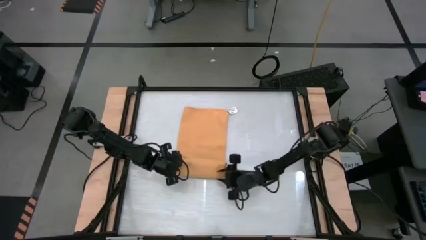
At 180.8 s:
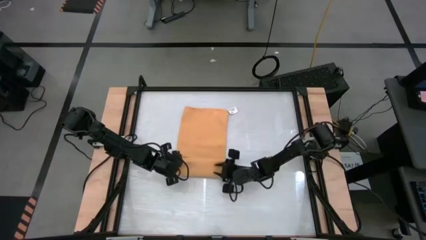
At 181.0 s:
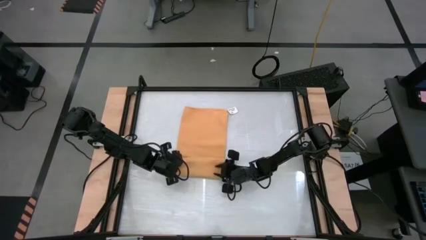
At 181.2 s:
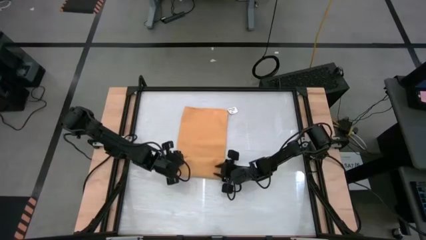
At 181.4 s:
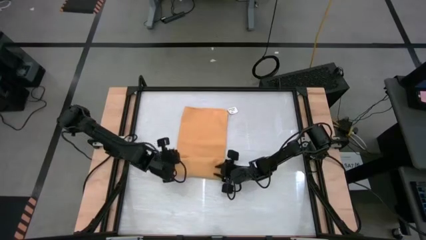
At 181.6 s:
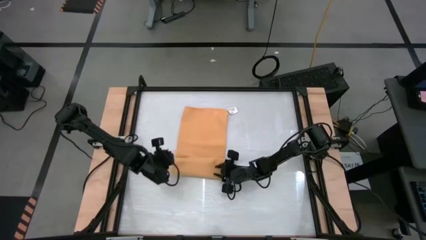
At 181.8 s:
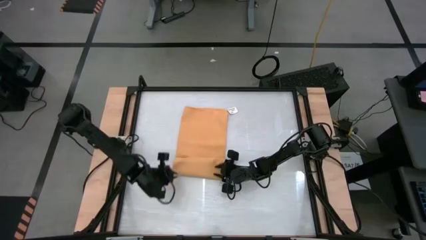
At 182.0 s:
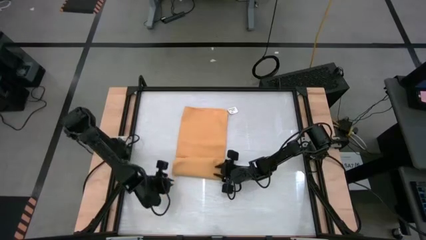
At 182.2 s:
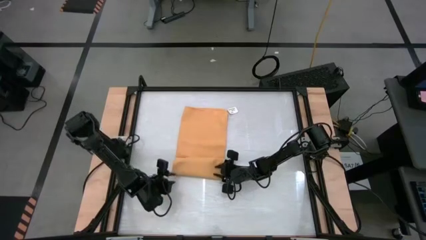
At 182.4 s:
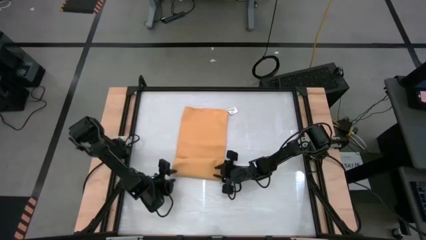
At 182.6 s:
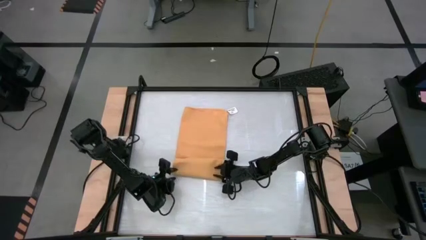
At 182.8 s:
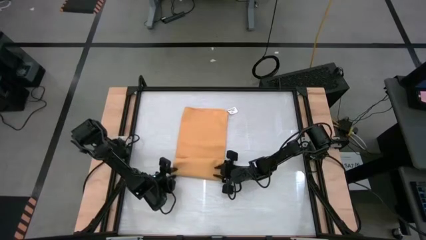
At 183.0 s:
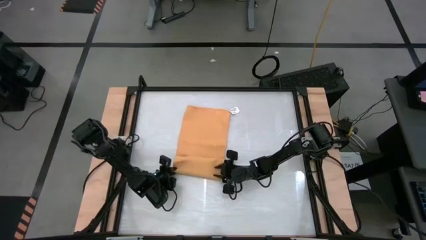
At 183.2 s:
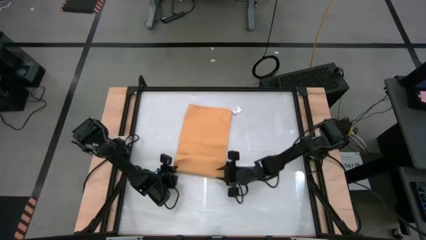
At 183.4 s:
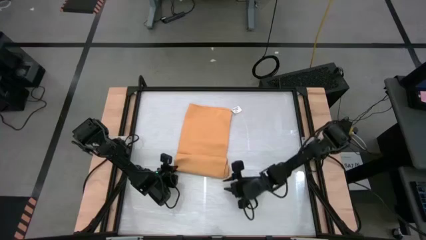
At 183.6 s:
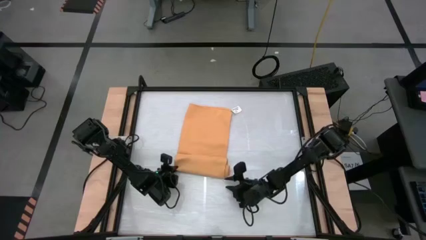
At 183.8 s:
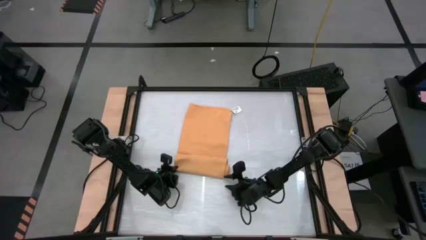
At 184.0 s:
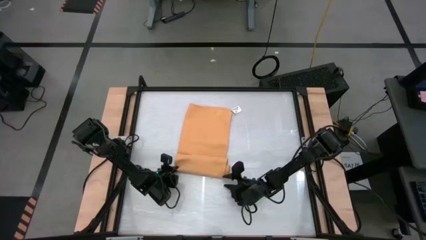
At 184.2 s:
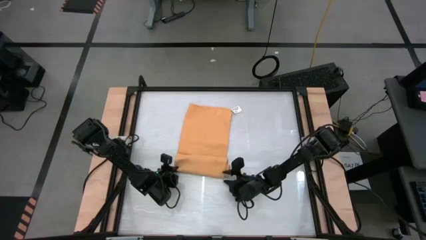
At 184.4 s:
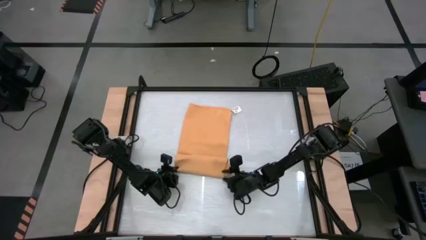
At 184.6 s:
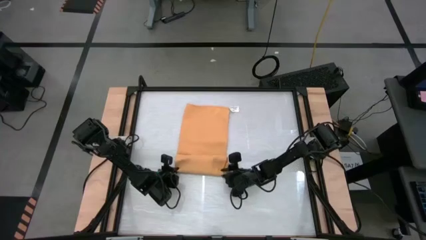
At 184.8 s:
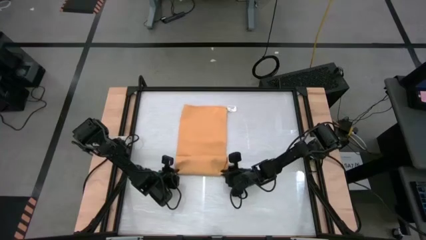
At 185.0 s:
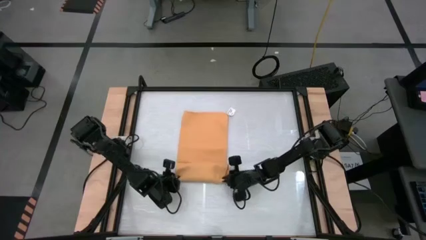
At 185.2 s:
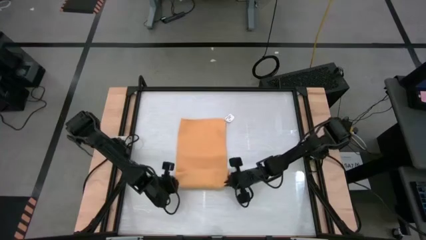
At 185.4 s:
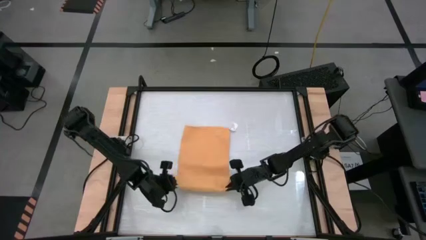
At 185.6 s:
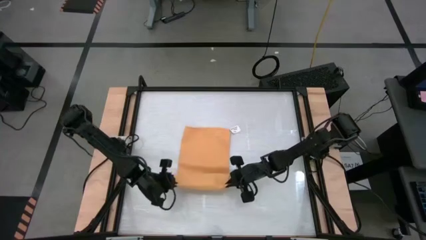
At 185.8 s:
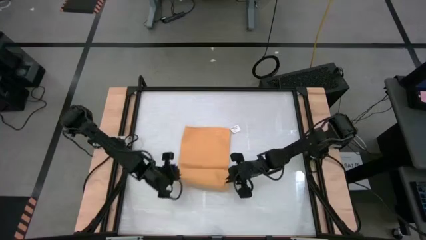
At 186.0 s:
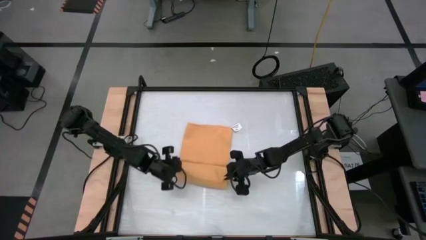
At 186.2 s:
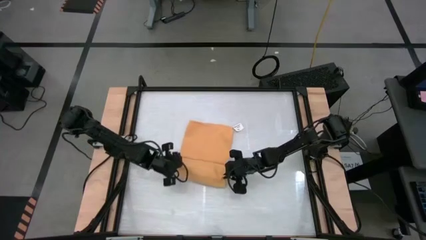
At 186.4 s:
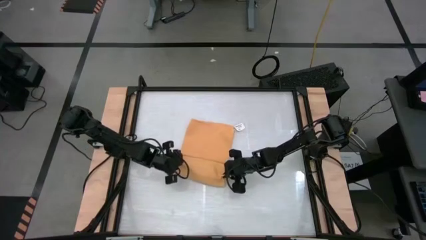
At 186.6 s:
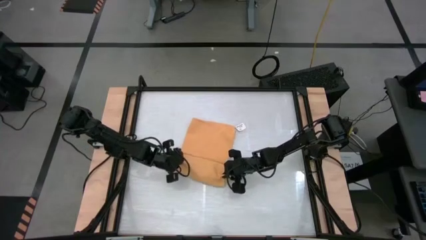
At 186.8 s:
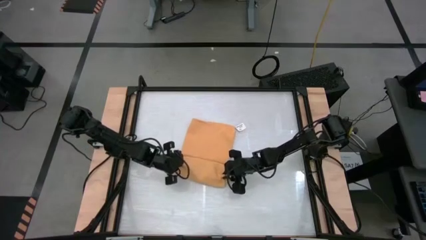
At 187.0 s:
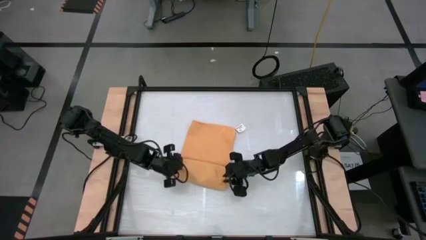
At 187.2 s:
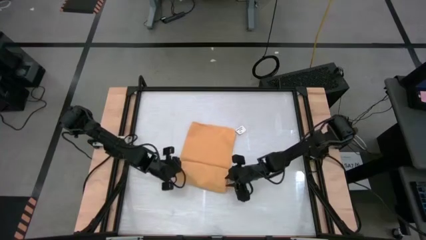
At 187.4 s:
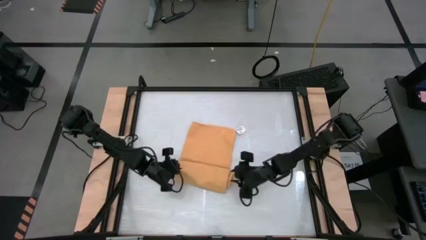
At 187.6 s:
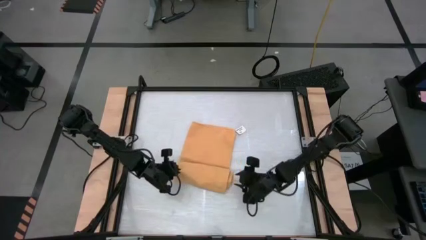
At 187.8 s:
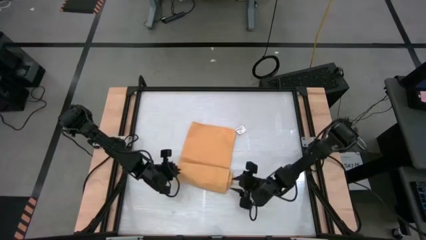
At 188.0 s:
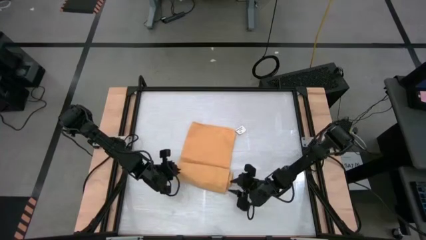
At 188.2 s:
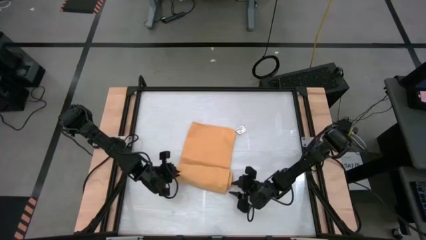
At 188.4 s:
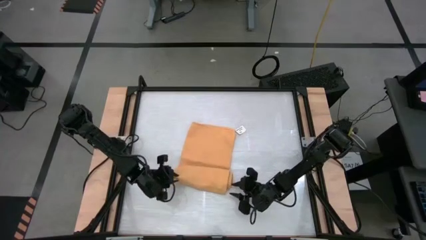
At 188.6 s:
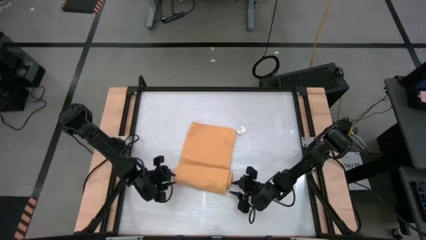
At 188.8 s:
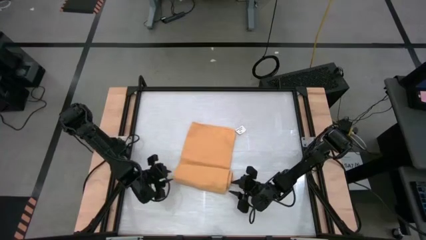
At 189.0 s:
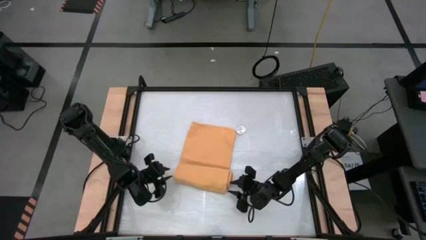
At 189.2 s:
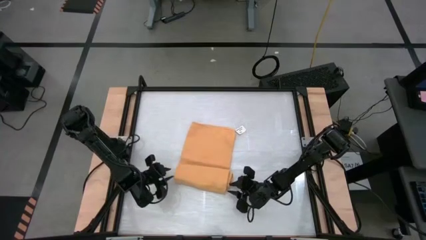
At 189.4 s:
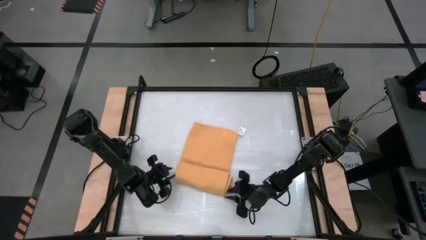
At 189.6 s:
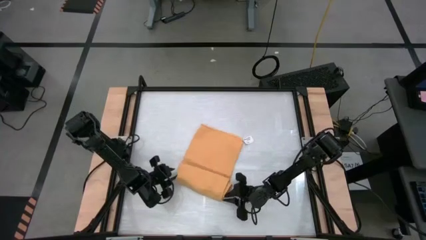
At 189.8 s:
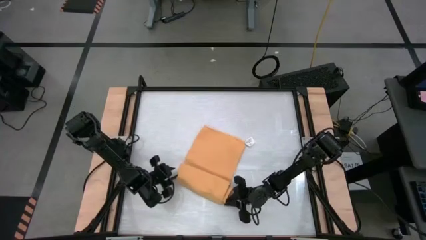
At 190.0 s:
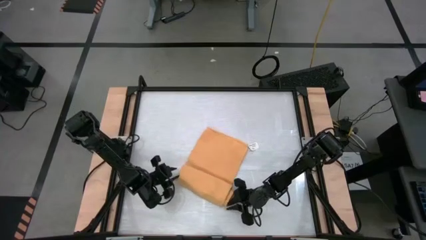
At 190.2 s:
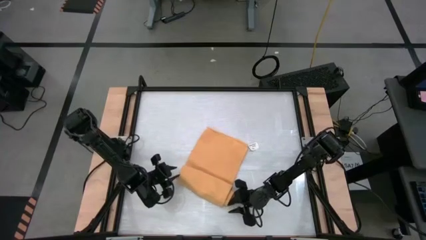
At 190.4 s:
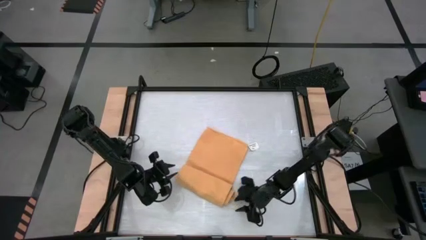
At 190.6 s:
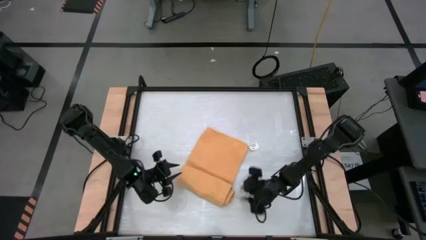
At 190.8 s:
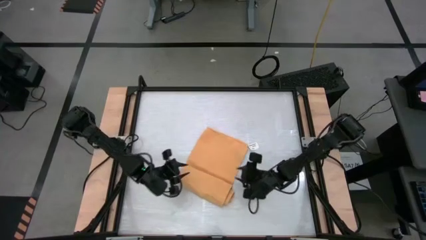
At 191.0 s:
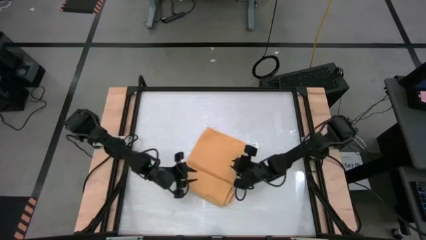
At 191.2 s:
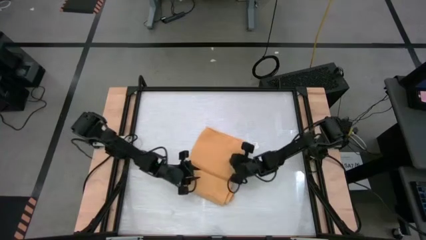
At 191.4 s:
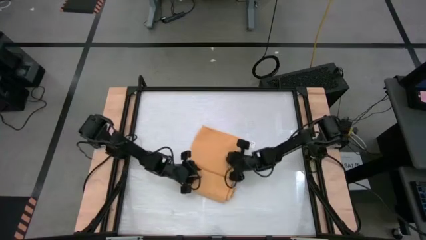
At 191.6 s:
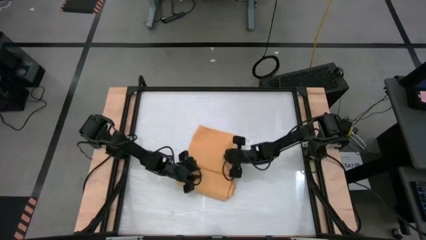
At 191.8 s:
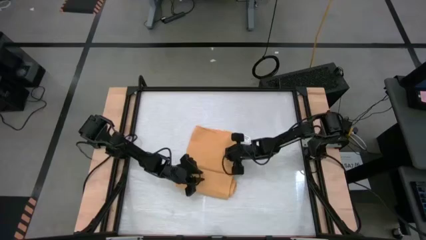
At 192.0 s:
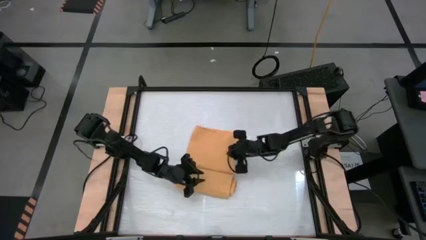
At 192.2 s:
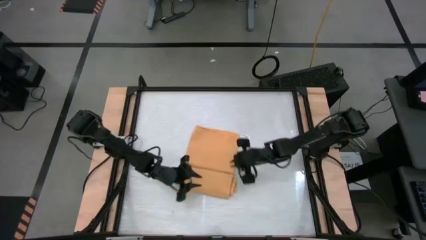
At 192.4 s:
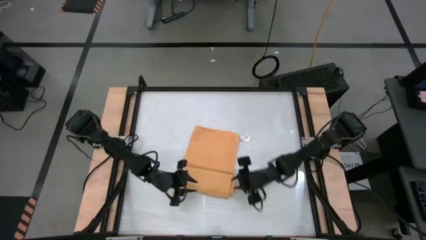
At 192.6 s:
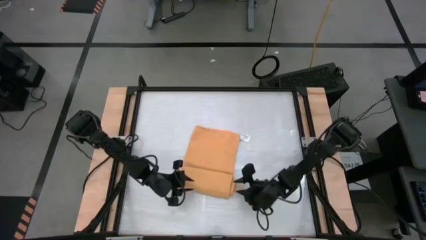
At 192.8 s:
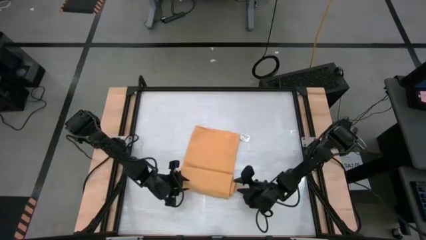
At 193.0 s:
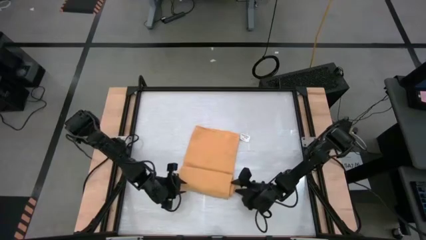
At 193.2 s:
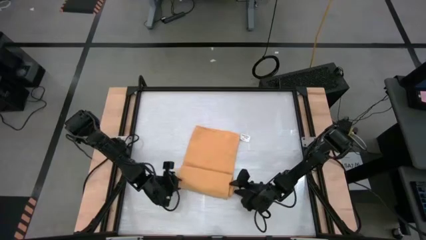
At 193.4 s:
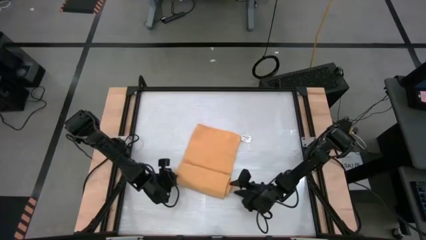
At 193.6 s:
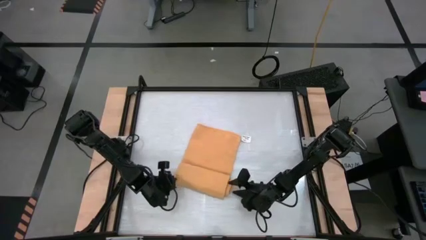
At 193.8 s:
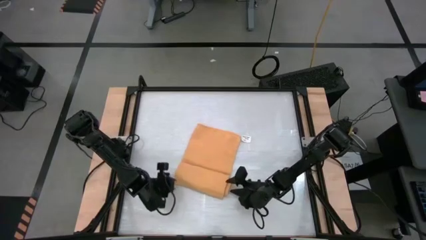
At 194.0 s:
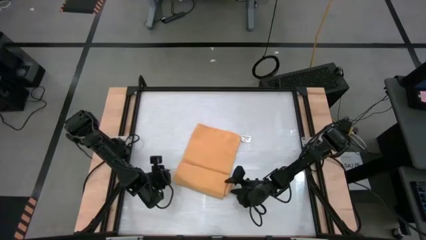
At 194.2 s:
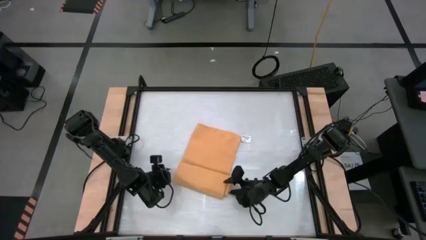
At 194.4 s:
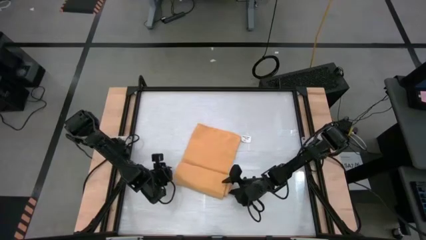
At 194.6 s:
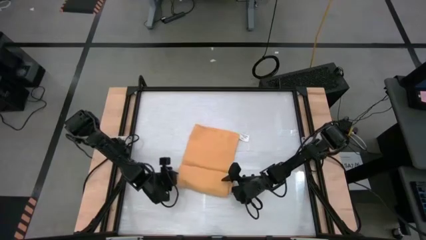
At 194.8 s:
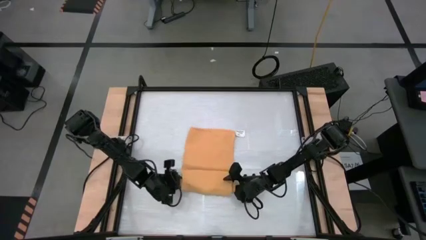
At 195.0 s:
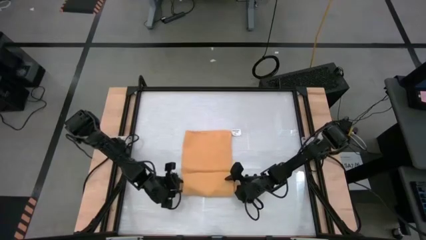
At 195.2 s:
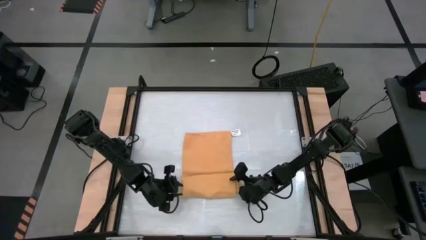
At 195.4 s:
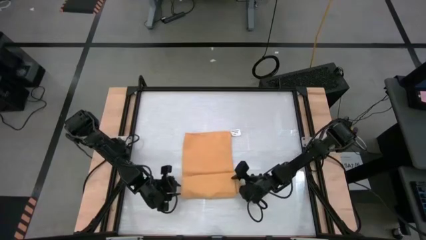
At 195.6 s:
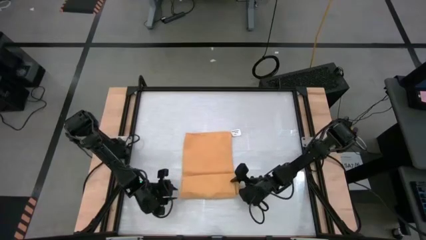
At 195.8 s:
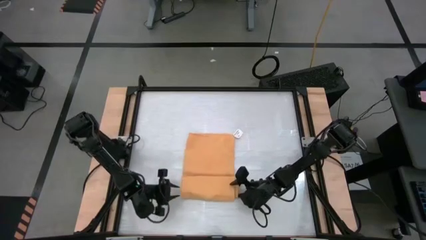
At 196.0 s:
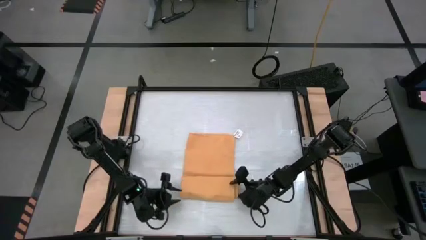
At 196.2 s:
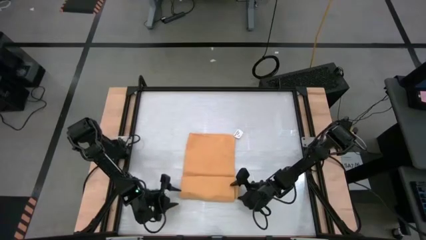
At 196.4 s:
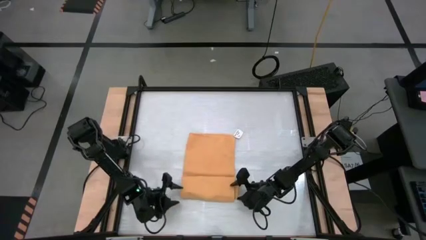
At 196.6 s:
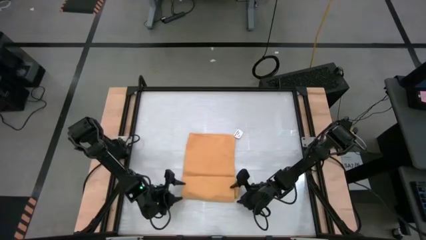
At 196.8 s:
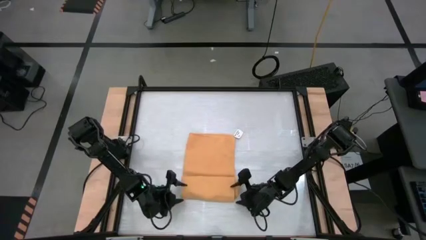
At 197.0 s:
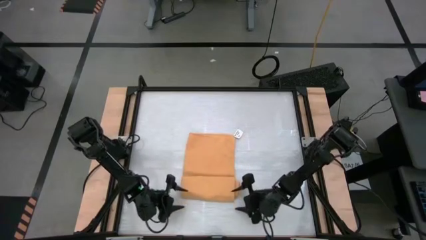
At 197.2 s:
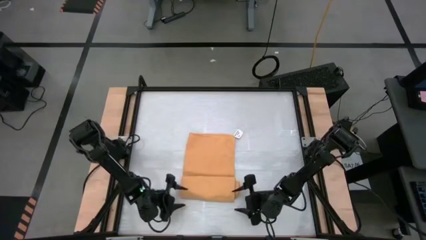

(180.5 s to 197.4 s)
Task: Roll towel into tight, uniform cylinder
Roll the yellow towel
